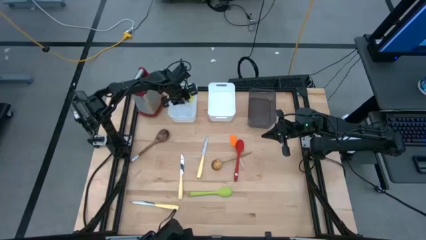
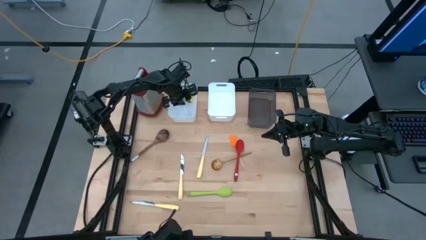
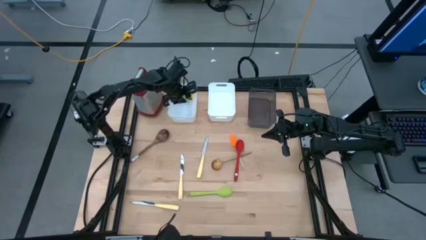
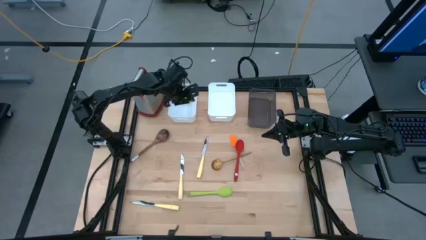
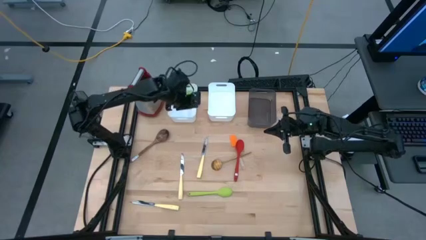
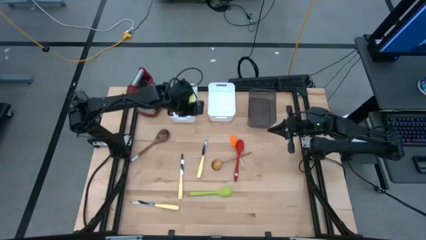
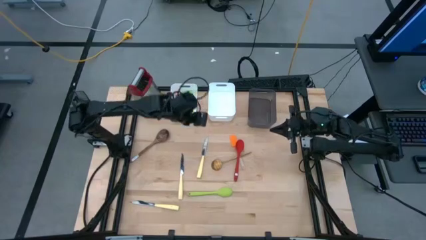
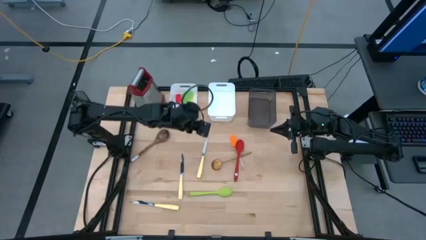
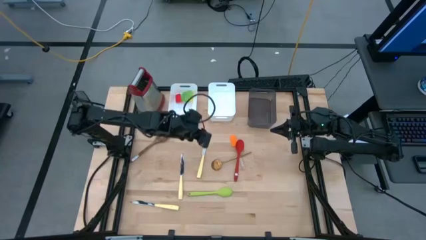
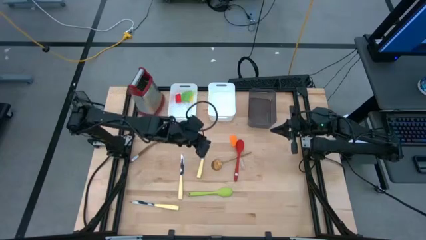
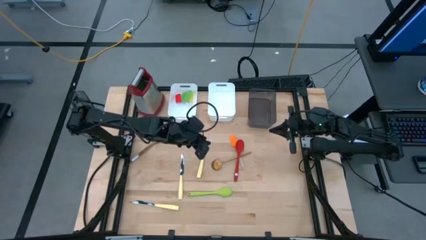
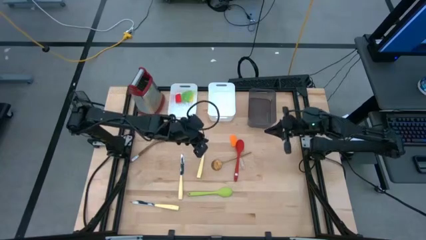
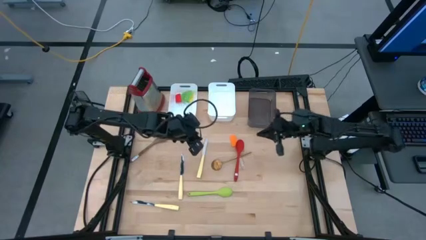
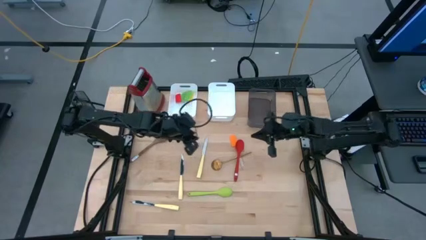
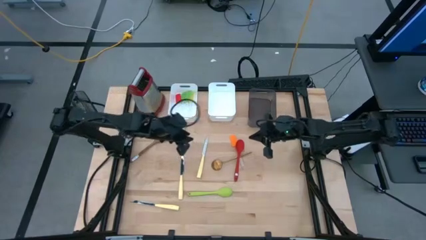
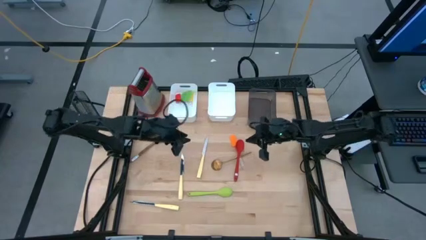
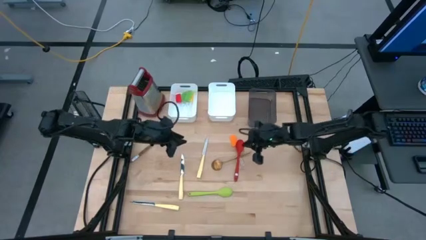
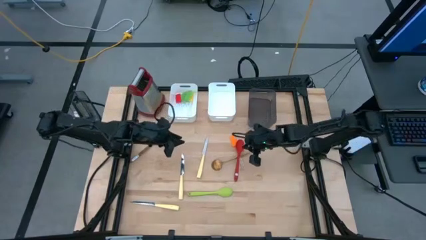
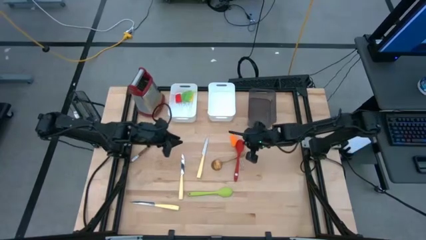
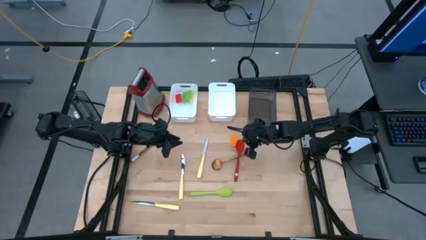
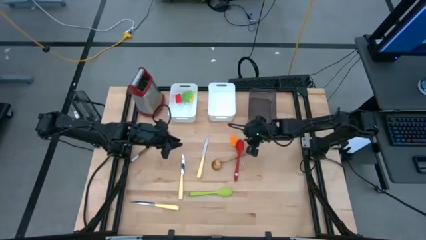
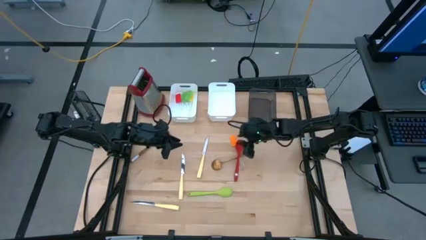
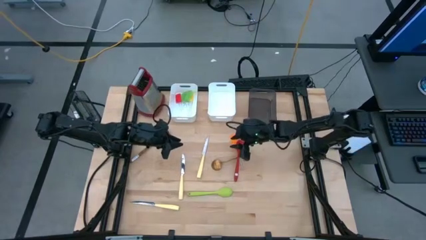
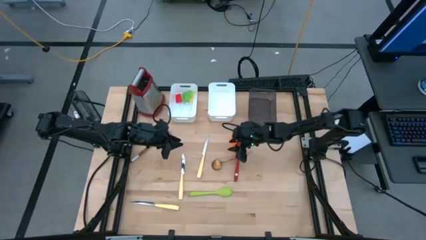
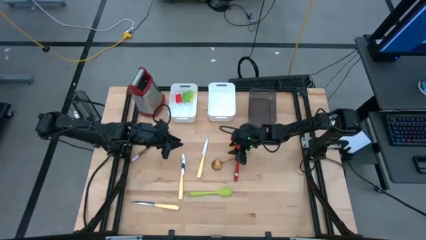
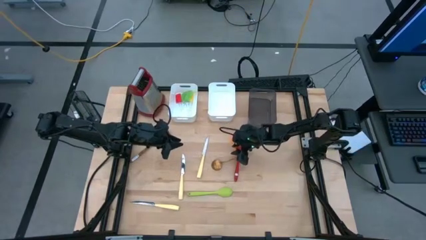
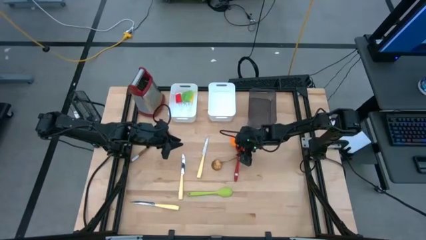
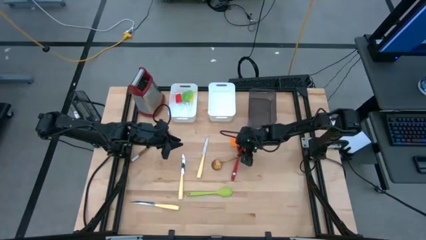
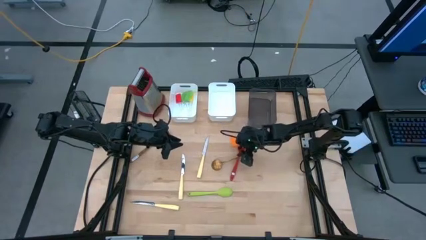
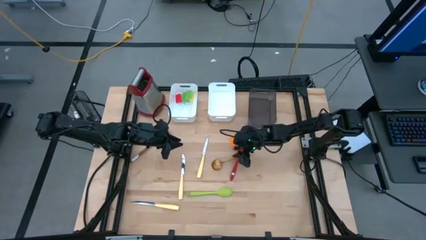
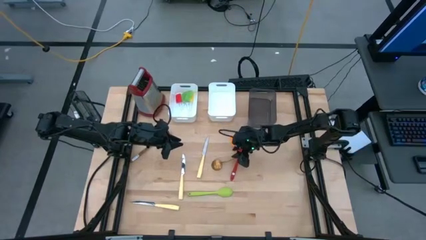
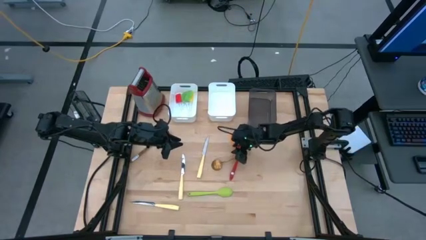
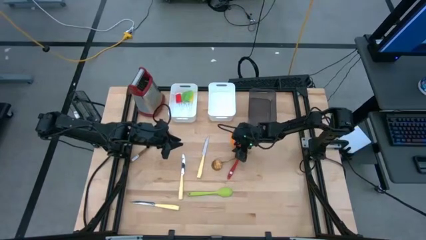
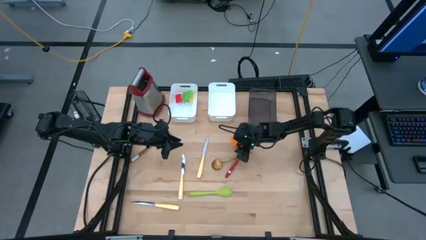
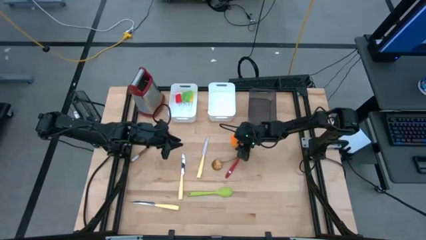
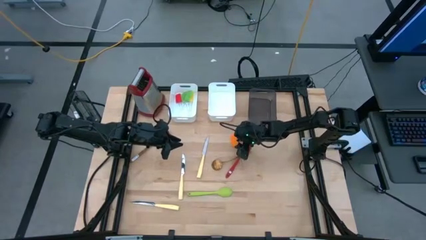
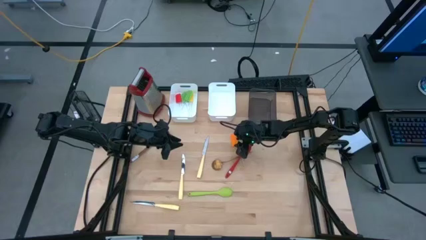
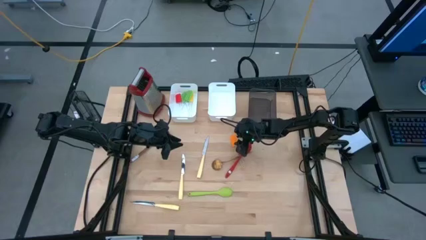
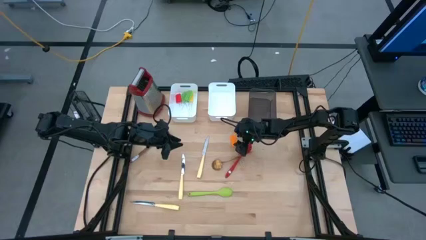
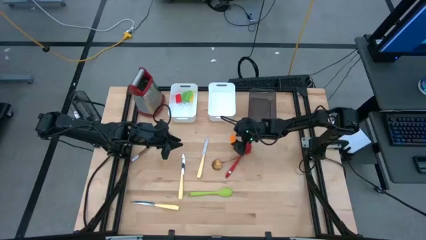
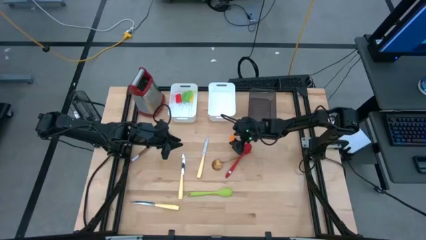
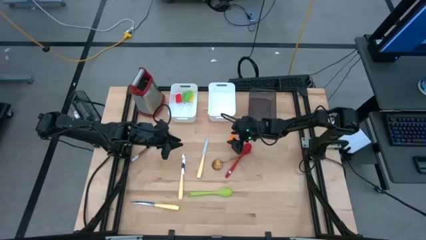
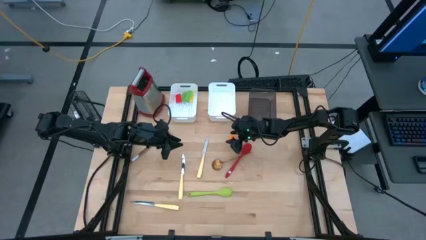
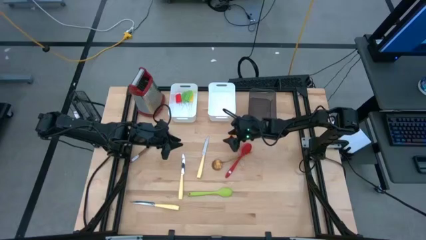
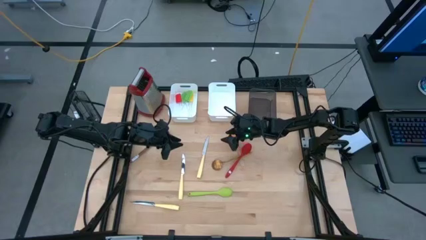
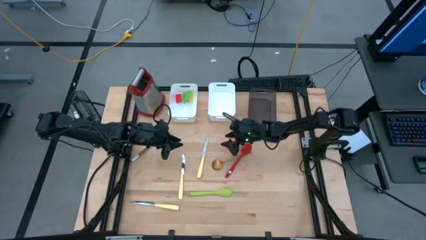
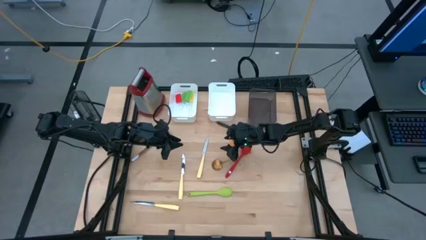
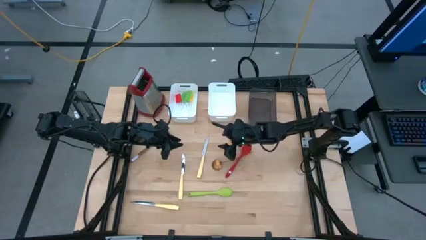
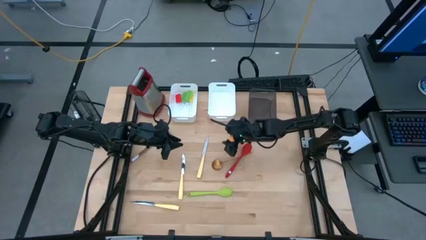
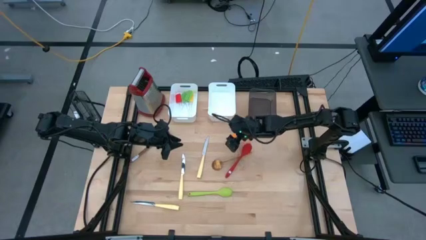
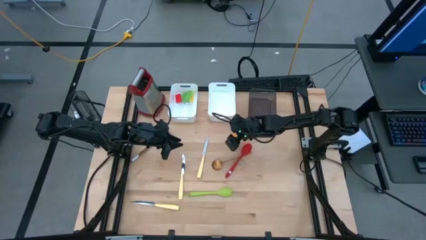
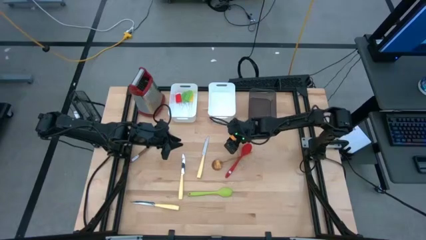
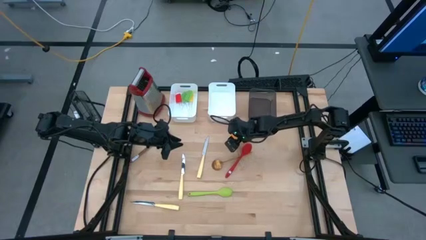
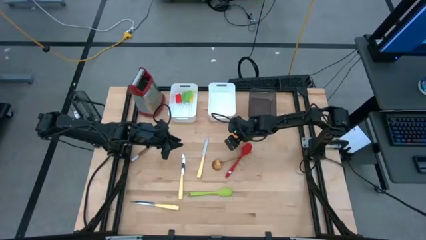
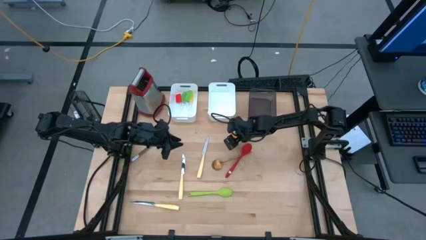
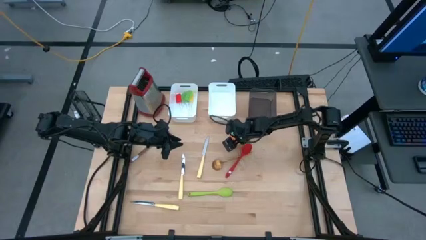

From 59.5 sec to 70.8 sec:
Task: Pick & Place Kitchen Items
Put the orange spatula into the left white bin
